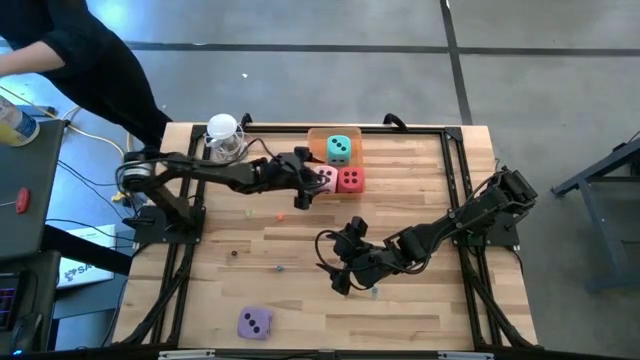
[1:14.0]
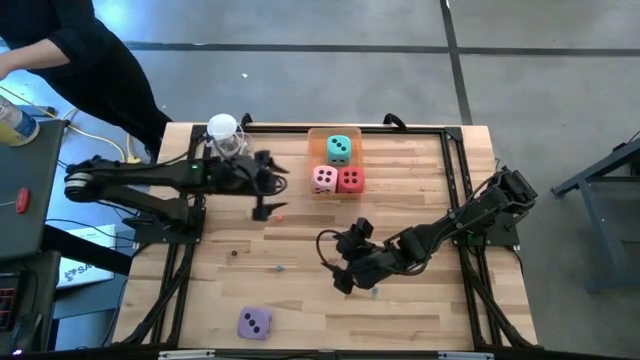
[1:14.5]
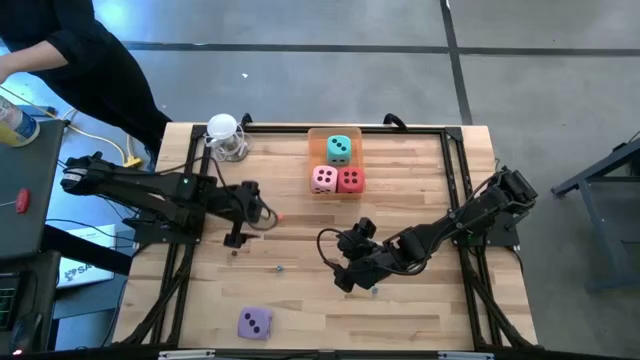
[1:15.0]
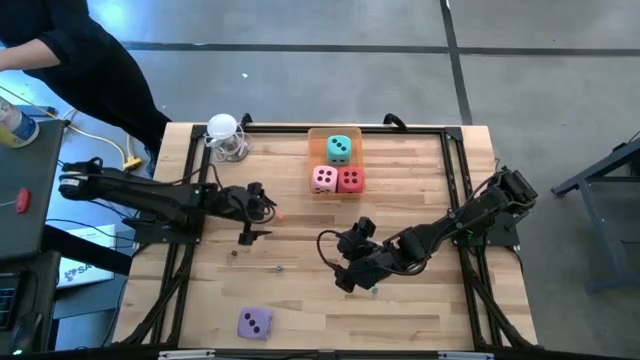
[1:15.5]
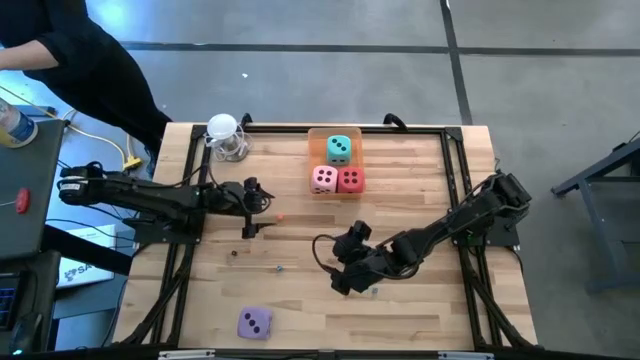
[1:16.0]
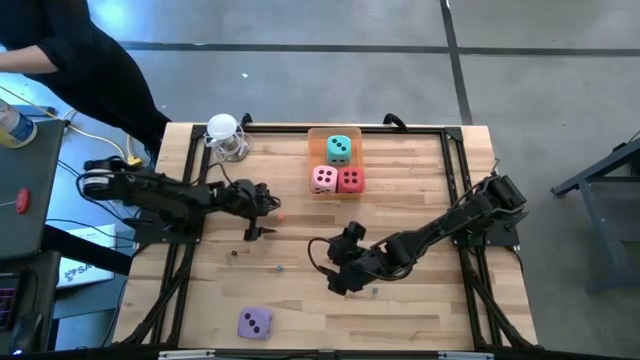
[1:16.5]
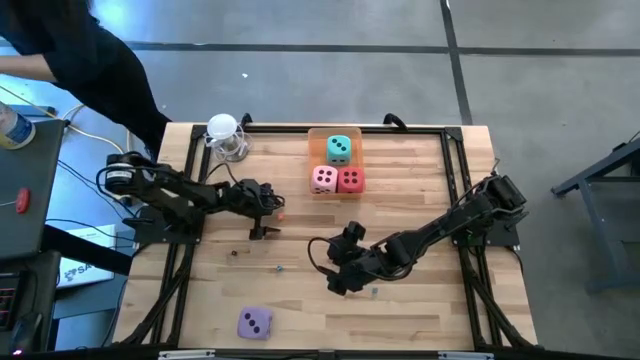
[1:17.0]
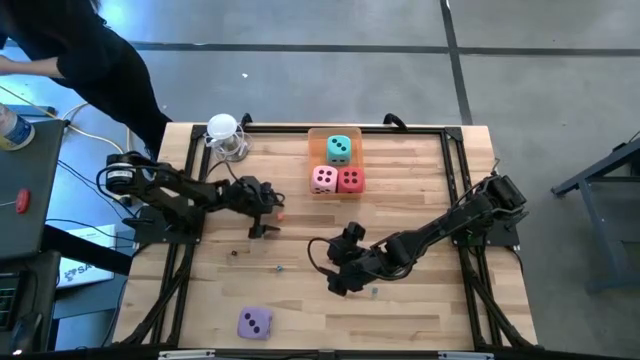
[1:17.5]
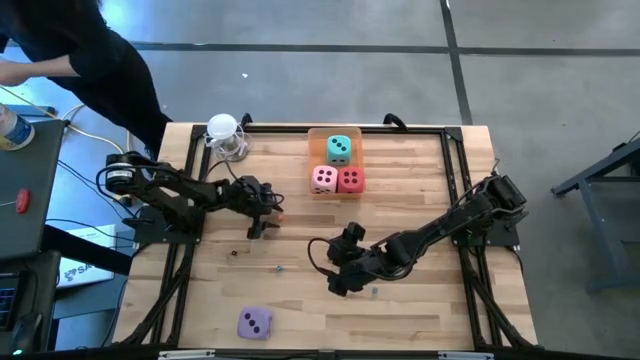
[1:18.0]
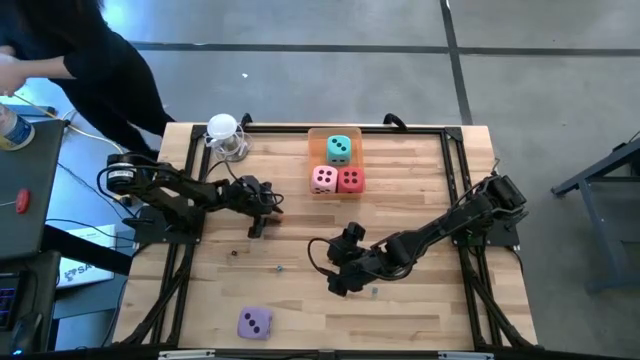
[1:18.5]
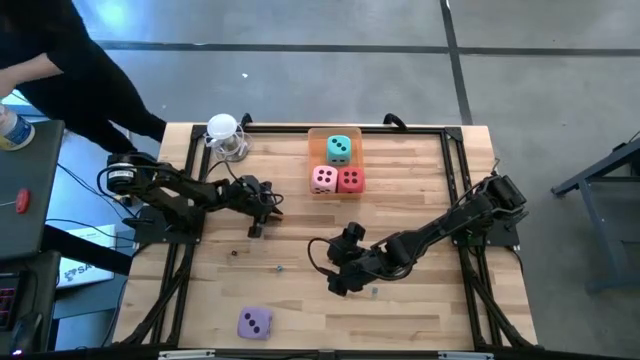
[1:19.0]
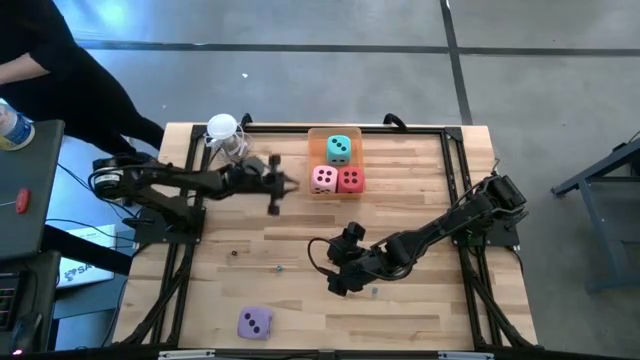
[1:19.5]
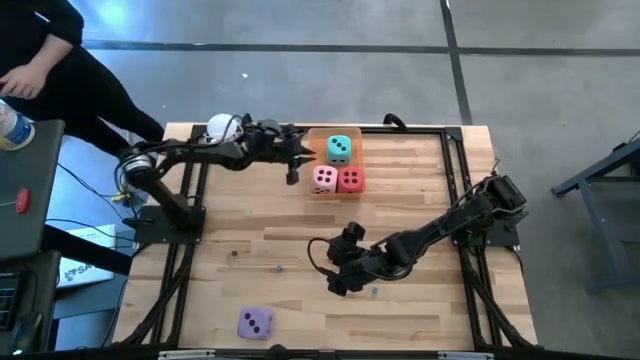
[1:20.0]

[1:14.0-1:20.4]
Task: Pick & Place Dice
Put the orange die into the orange bin

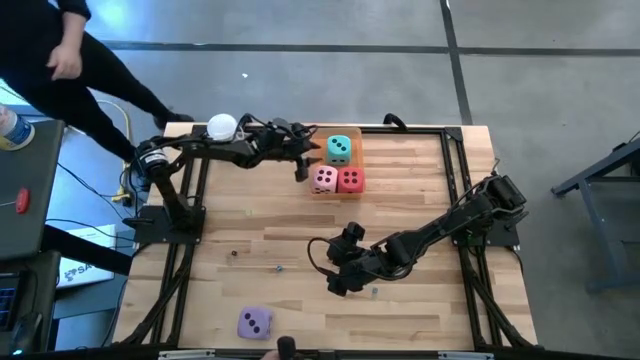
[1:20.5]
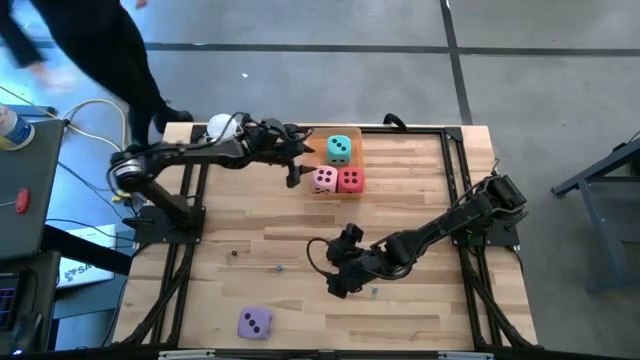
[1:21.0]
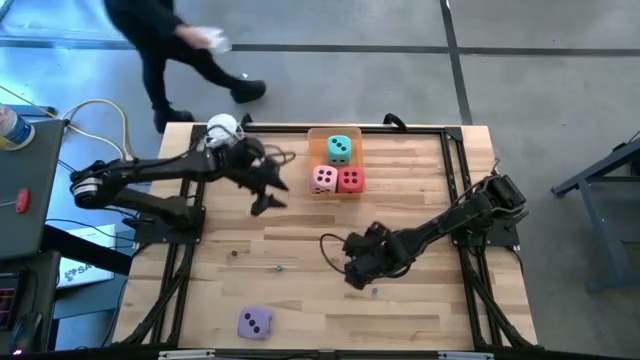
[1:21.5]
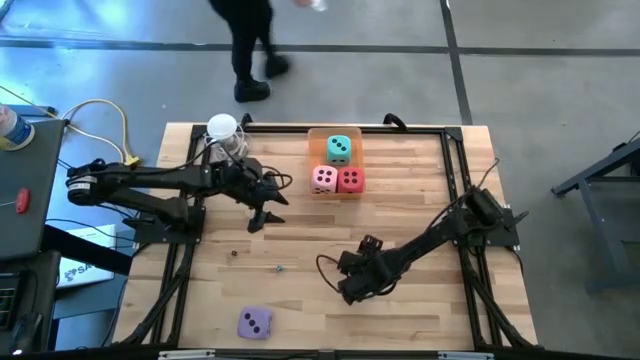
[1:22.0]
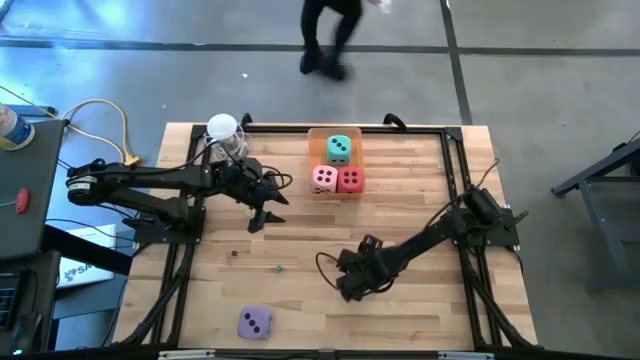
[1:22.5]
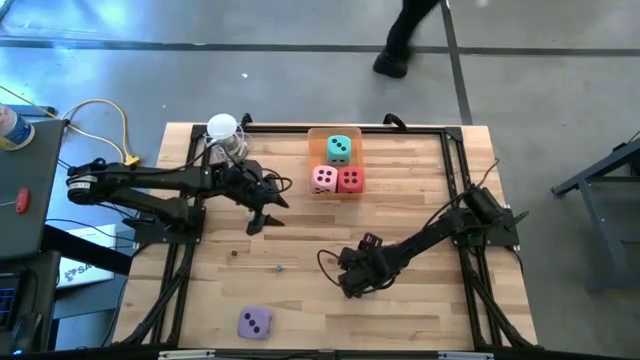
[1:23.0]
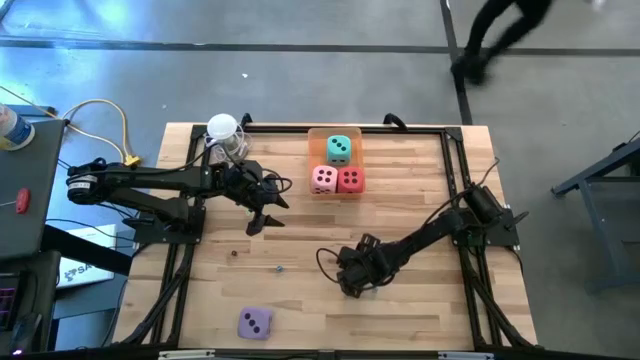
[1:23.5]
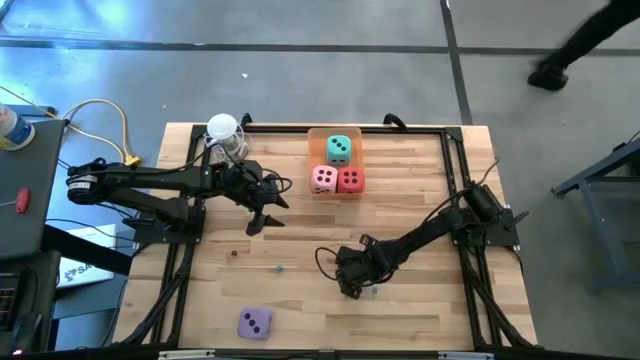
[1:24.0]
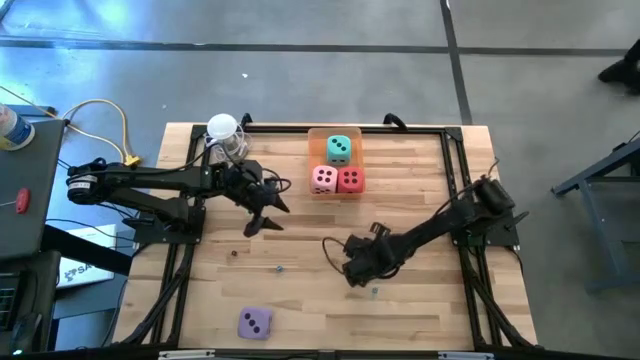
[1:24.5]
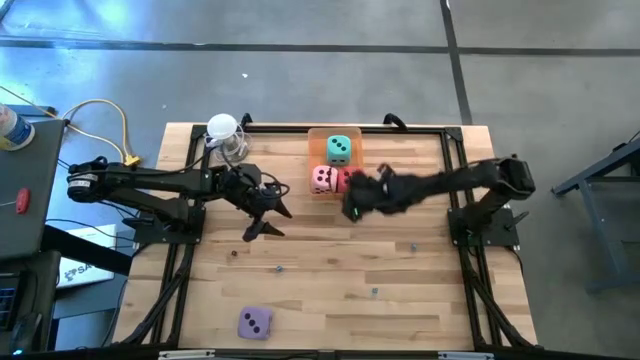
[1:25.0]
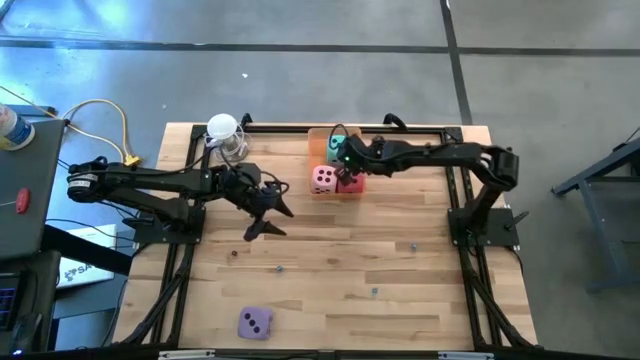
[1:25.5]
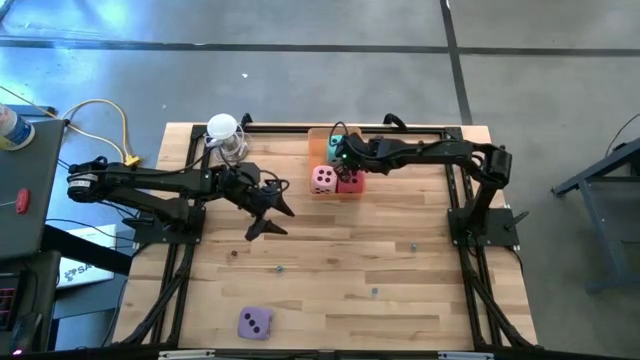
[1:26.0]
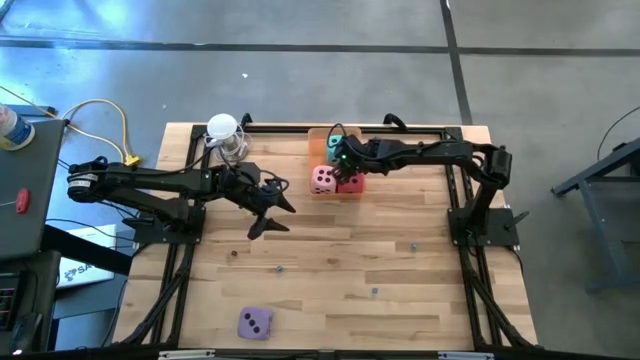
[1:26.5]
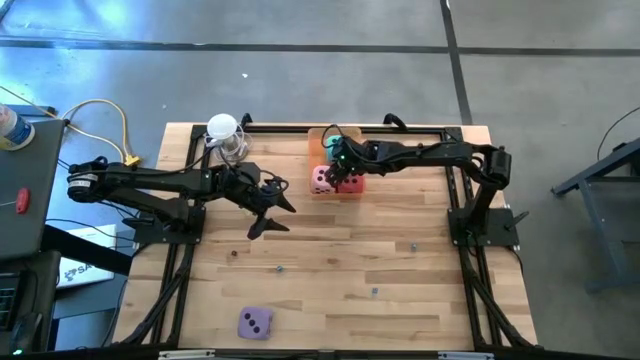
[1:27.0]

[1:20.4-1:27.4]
Put the blue die into the orange bin

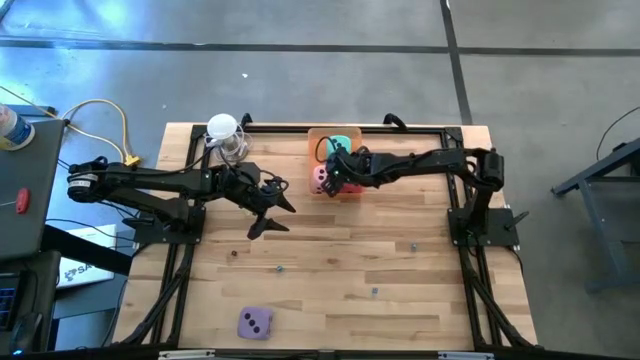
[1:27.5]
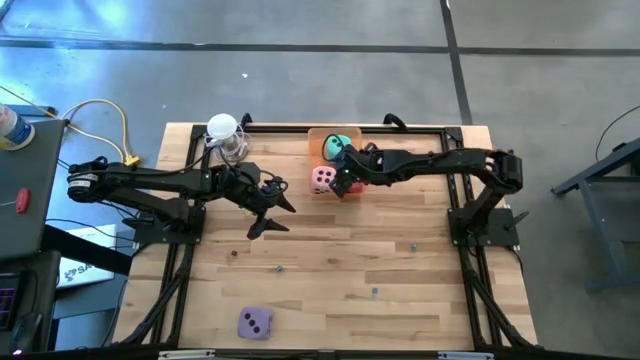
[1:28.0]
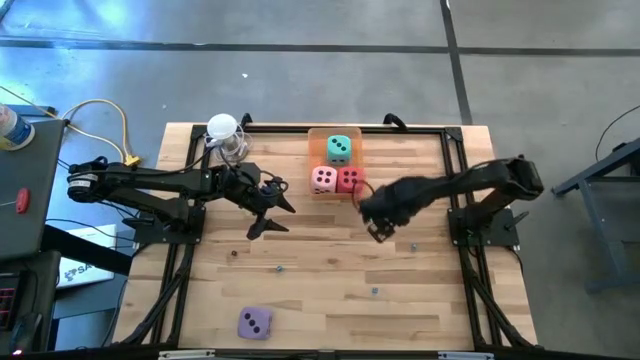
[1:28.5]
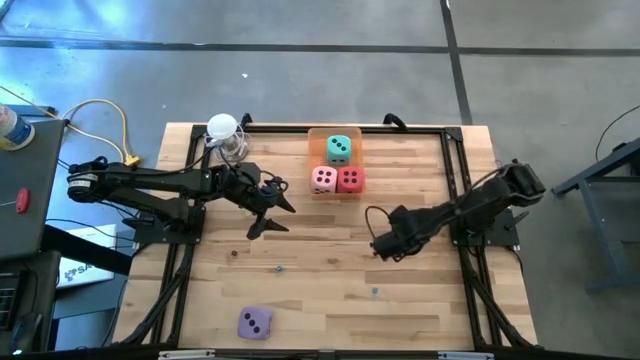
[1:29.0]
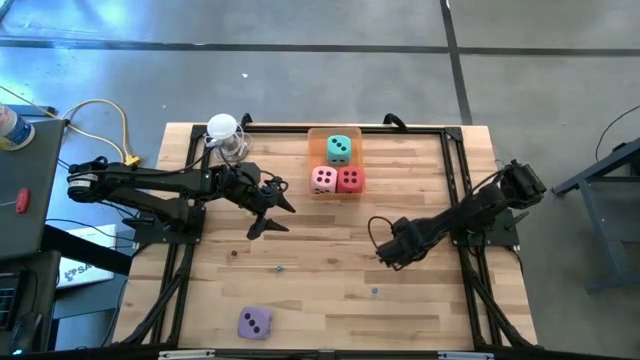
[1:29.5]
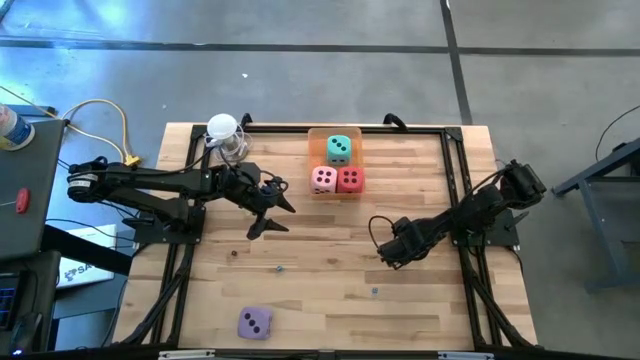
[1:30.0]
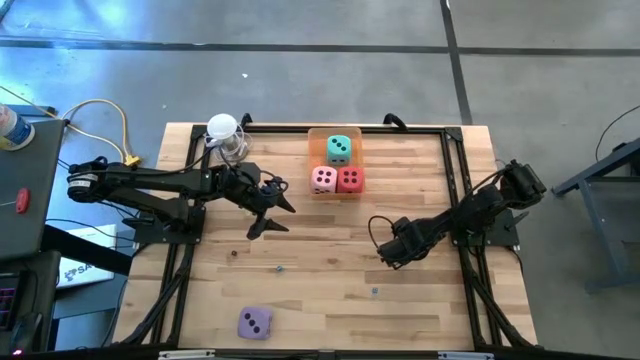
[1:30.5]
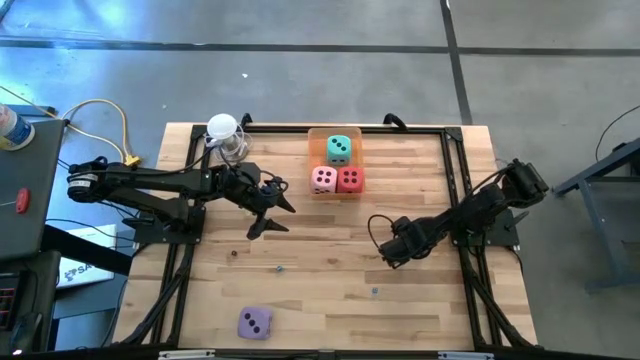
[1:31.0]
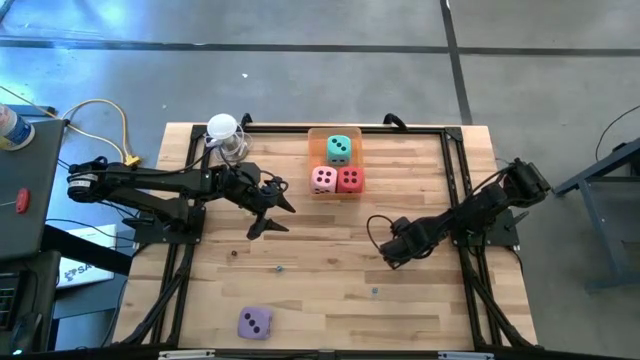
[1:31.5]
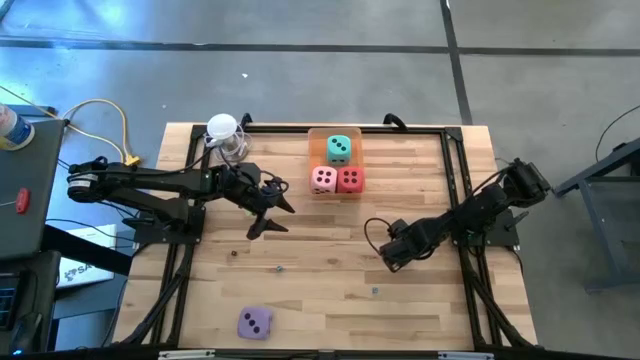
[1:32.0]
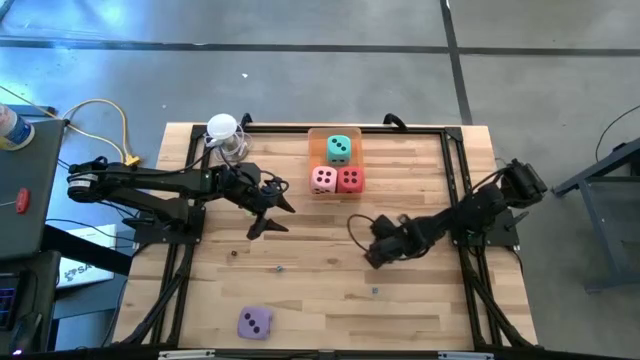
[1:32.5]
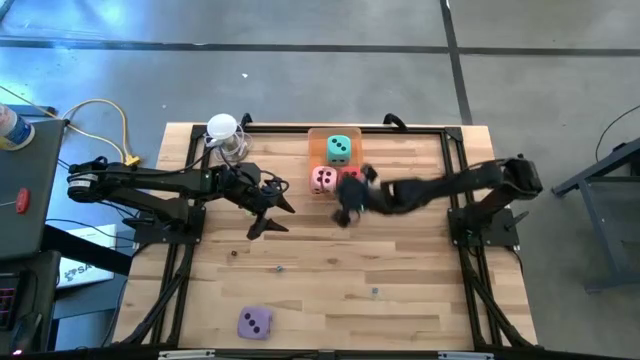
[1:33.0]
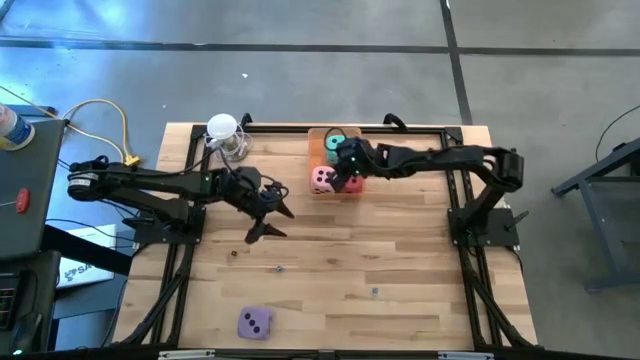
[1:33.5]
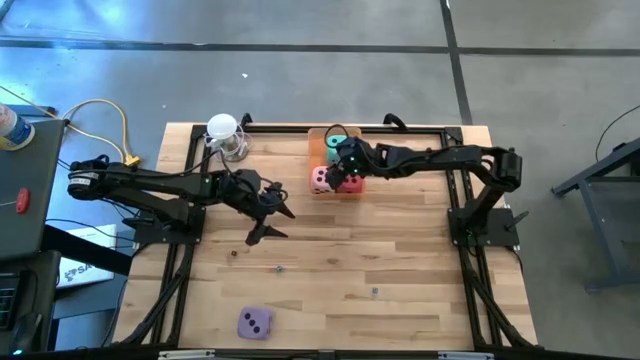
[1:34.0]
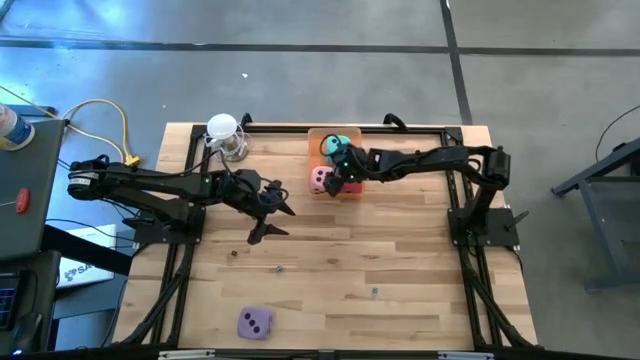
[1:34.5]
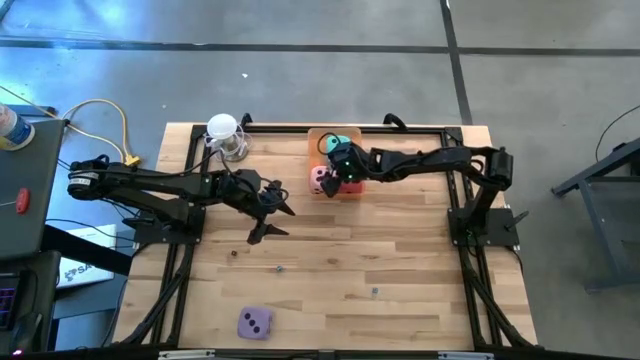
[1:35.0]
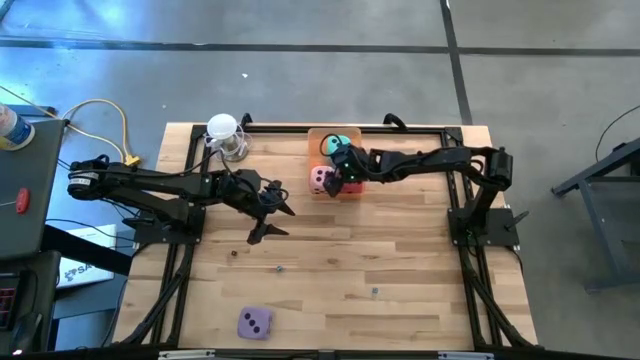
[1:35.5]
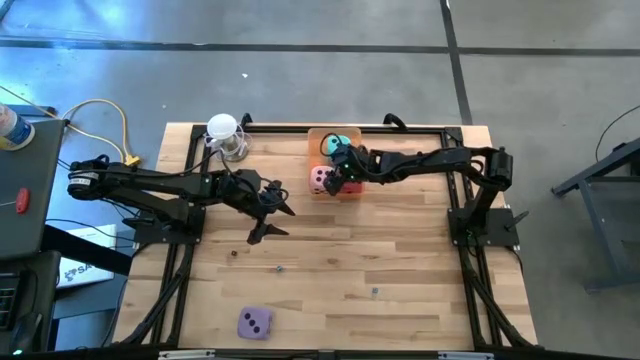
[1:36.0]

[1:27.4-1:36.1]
Put the blue die into the orange bin
